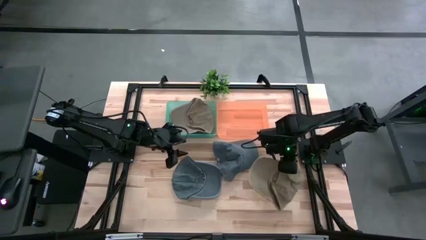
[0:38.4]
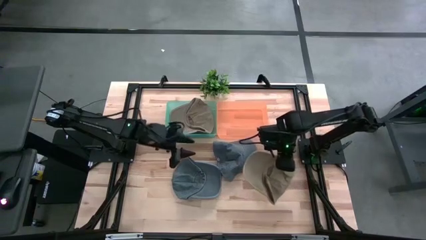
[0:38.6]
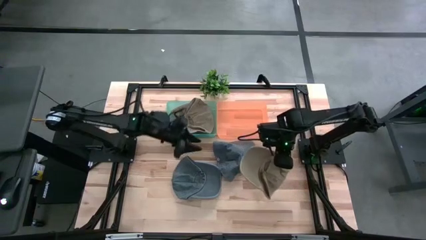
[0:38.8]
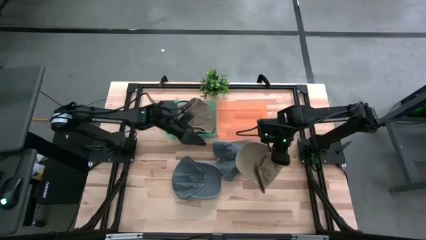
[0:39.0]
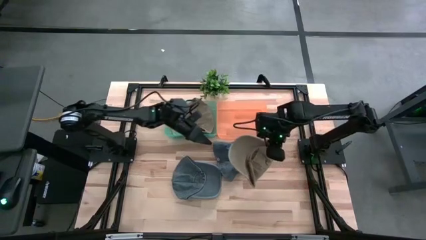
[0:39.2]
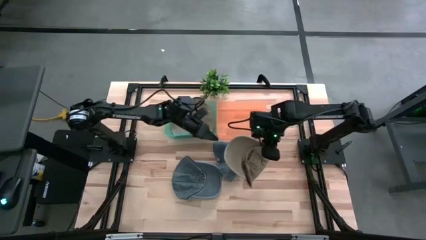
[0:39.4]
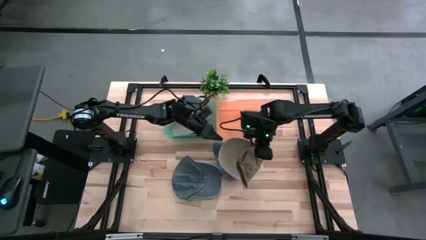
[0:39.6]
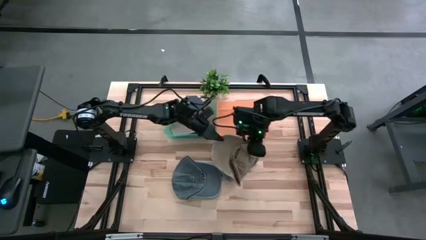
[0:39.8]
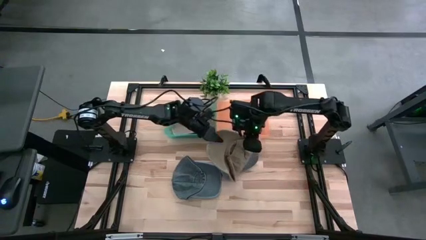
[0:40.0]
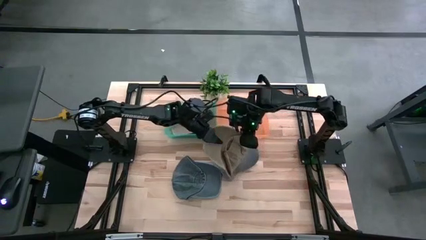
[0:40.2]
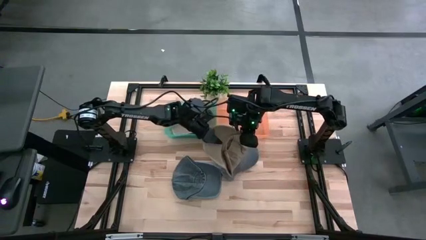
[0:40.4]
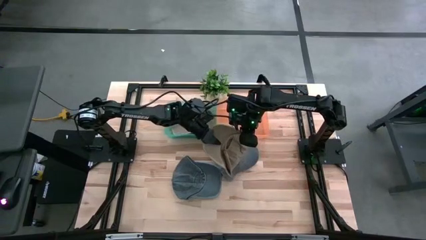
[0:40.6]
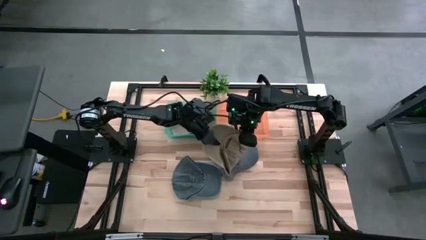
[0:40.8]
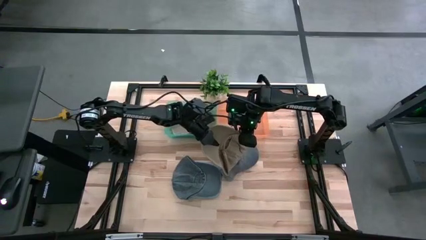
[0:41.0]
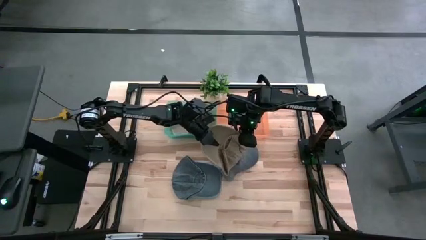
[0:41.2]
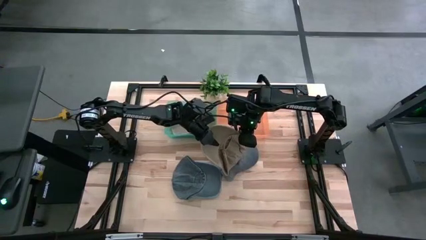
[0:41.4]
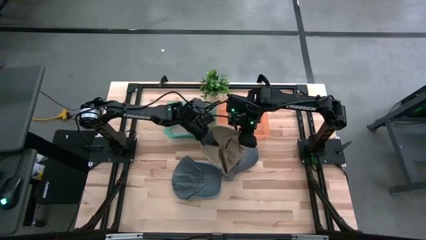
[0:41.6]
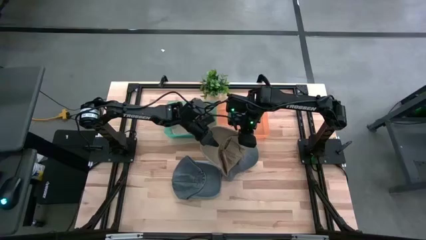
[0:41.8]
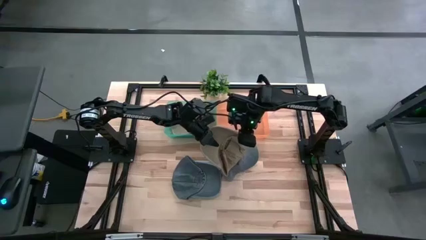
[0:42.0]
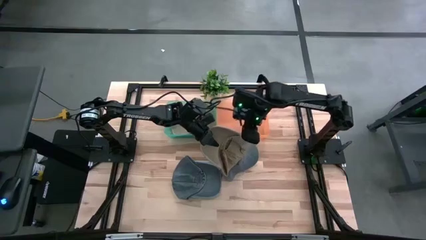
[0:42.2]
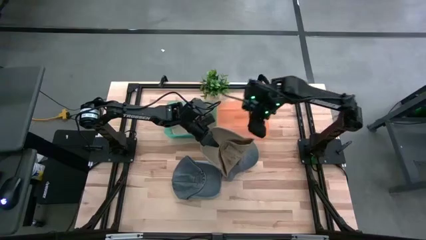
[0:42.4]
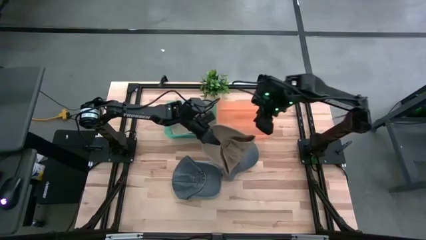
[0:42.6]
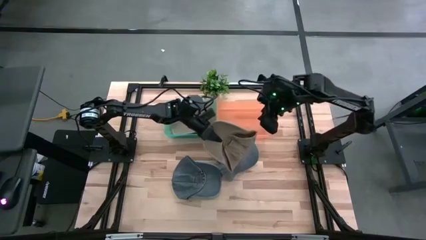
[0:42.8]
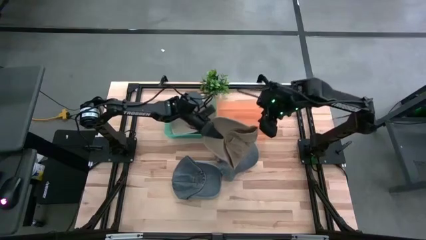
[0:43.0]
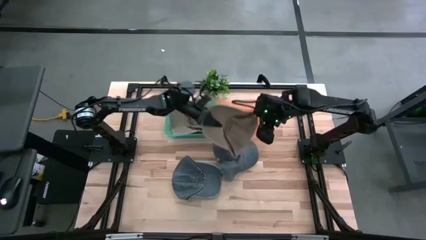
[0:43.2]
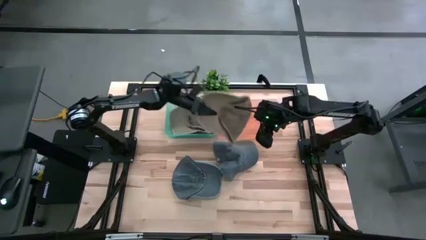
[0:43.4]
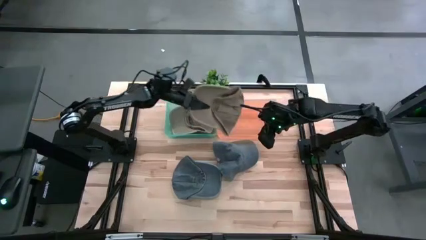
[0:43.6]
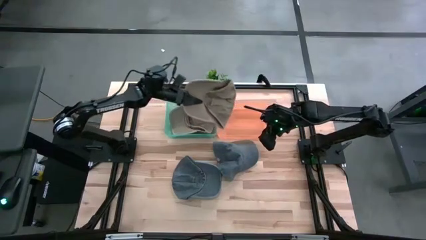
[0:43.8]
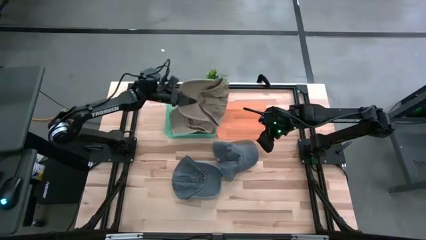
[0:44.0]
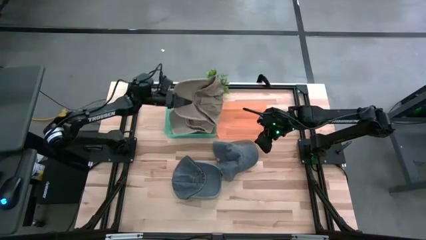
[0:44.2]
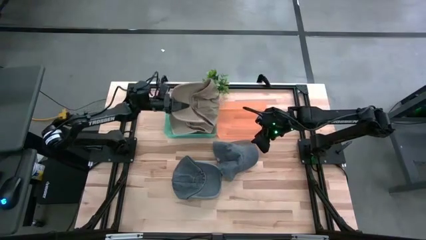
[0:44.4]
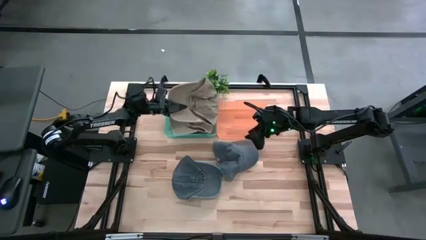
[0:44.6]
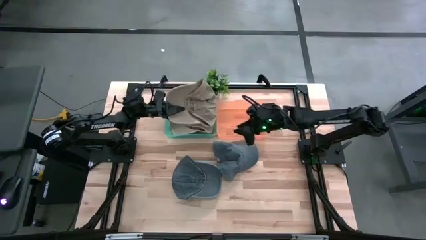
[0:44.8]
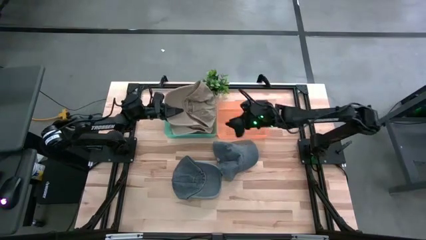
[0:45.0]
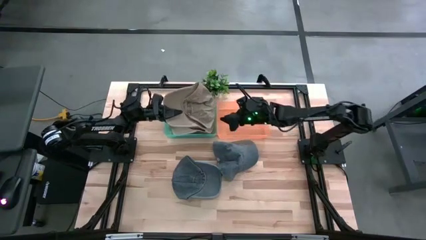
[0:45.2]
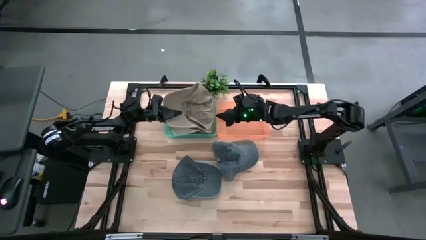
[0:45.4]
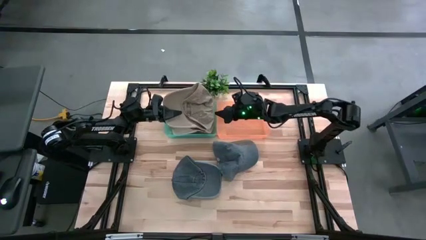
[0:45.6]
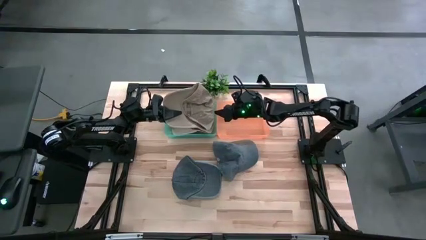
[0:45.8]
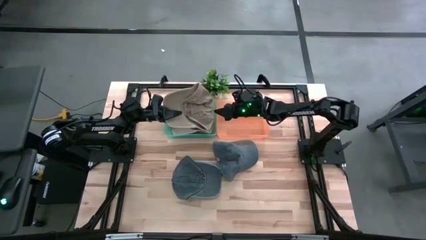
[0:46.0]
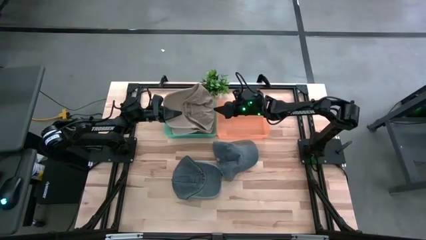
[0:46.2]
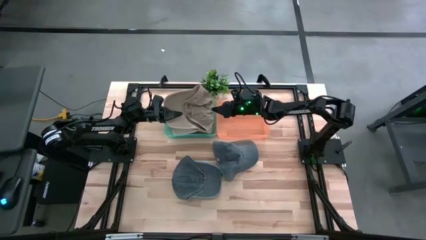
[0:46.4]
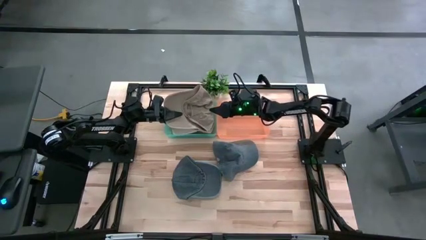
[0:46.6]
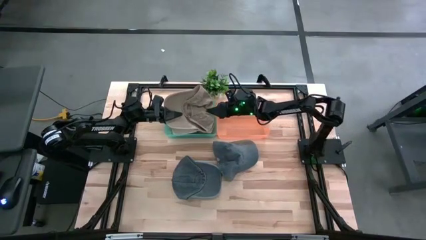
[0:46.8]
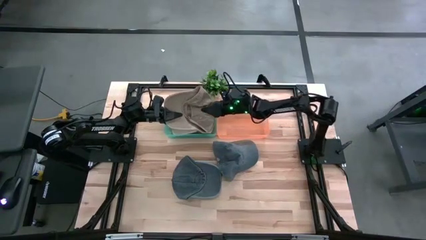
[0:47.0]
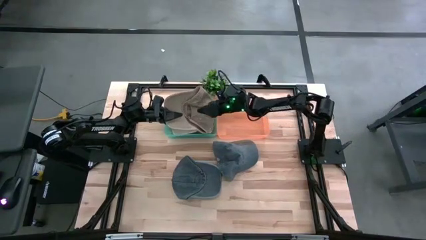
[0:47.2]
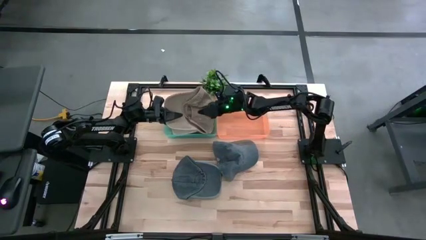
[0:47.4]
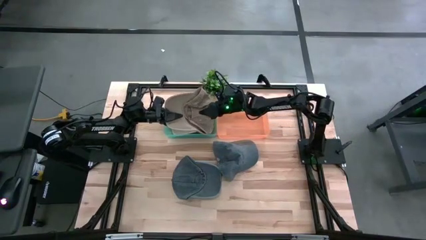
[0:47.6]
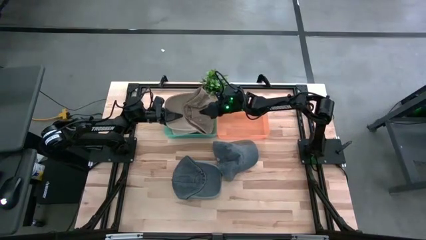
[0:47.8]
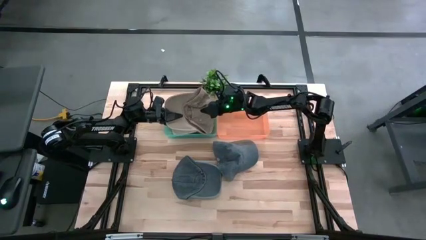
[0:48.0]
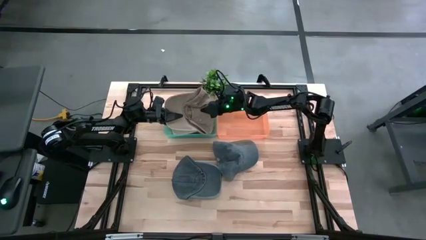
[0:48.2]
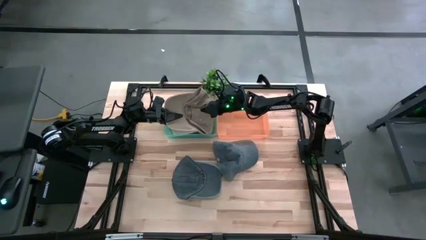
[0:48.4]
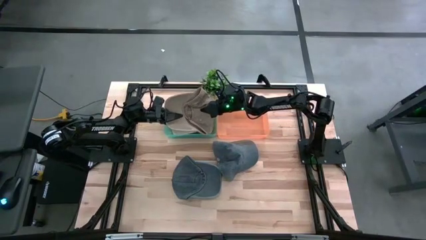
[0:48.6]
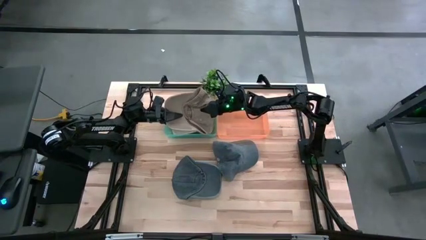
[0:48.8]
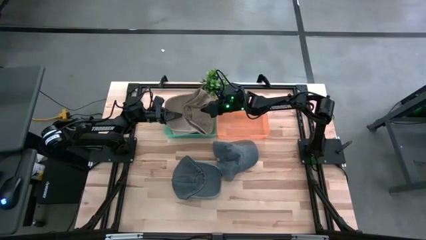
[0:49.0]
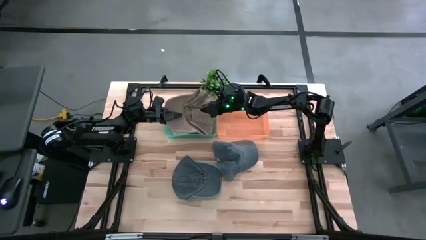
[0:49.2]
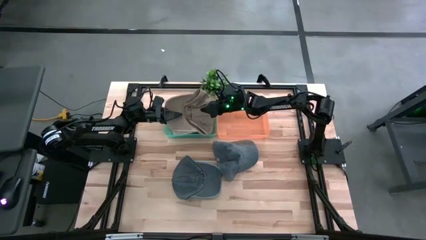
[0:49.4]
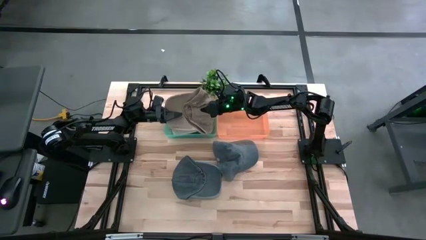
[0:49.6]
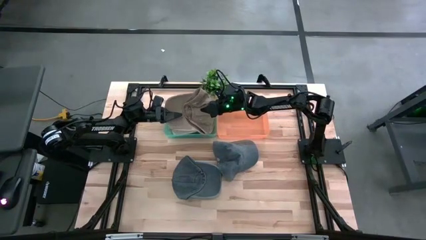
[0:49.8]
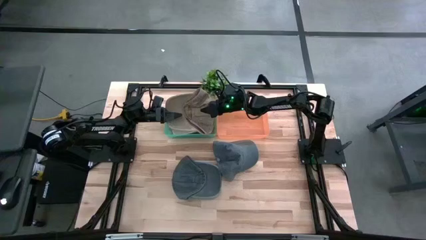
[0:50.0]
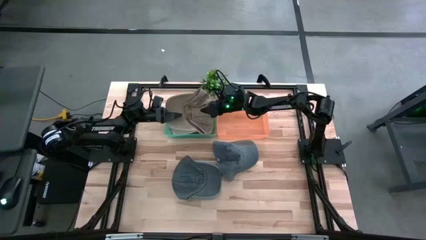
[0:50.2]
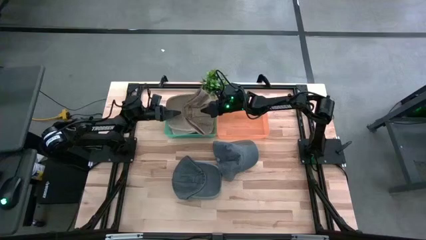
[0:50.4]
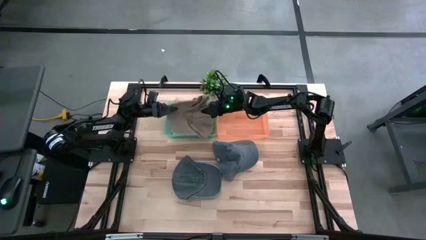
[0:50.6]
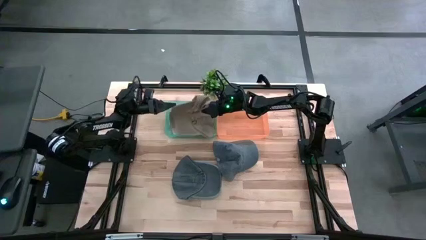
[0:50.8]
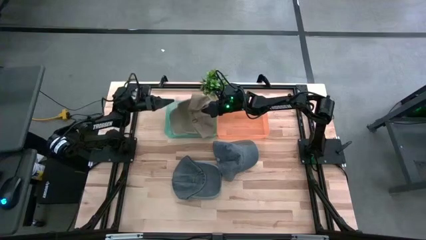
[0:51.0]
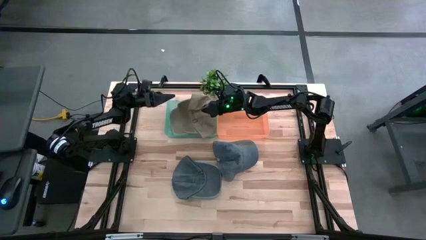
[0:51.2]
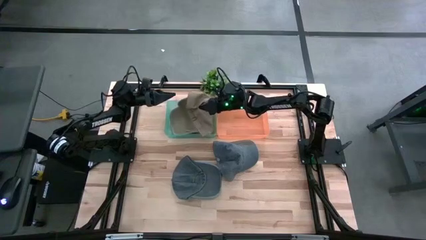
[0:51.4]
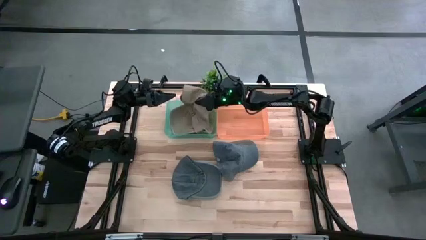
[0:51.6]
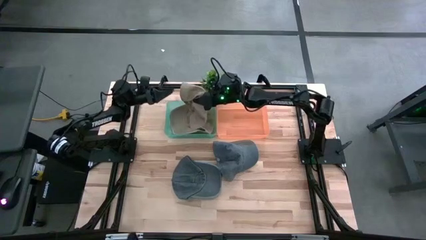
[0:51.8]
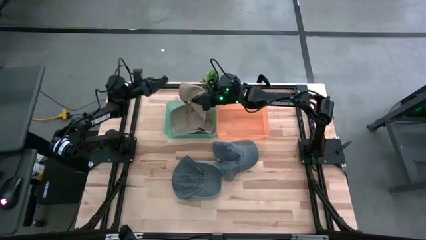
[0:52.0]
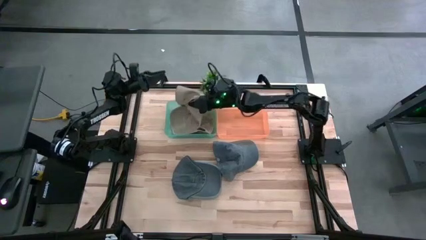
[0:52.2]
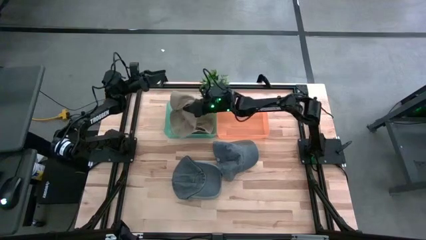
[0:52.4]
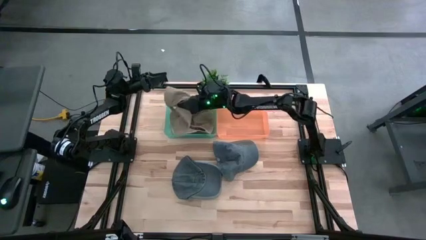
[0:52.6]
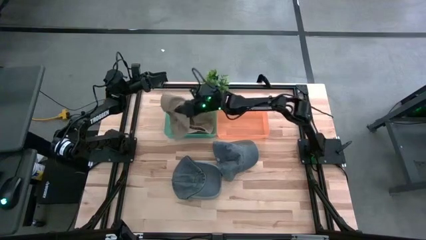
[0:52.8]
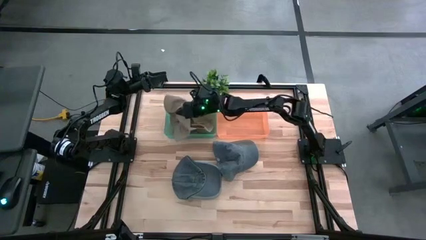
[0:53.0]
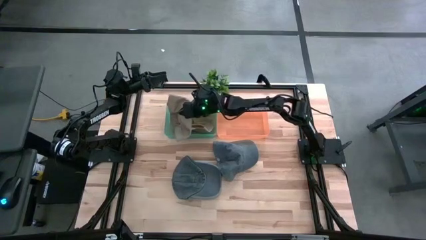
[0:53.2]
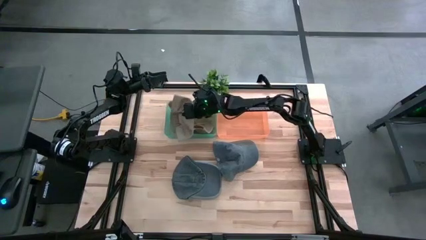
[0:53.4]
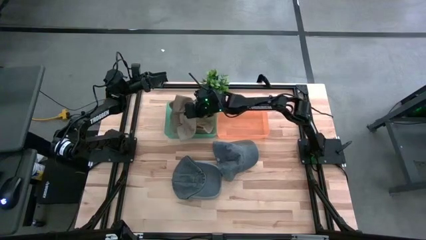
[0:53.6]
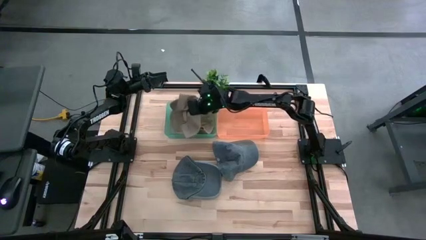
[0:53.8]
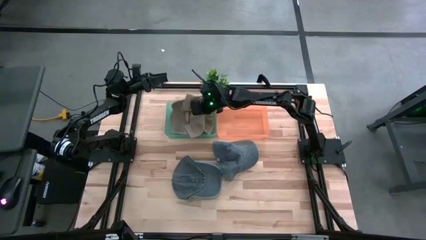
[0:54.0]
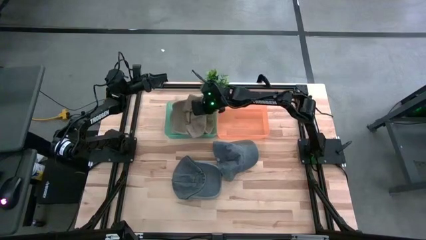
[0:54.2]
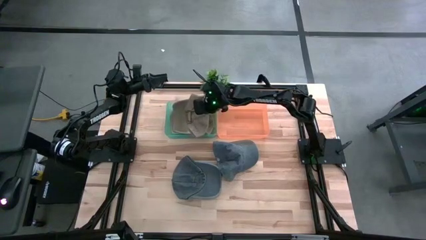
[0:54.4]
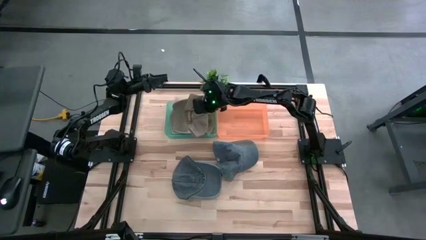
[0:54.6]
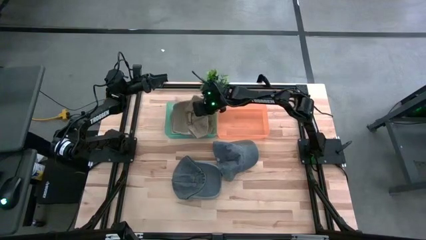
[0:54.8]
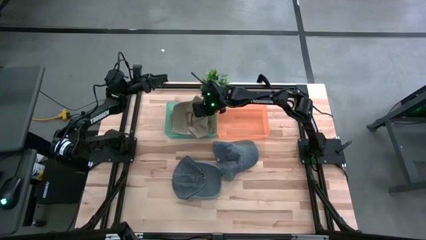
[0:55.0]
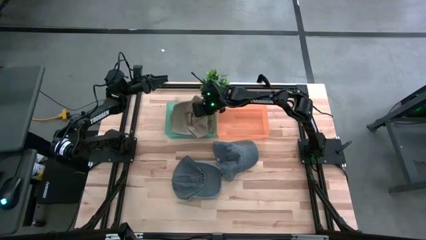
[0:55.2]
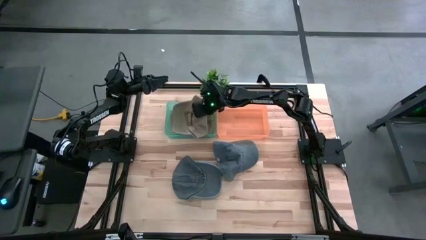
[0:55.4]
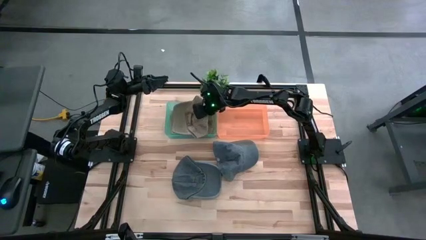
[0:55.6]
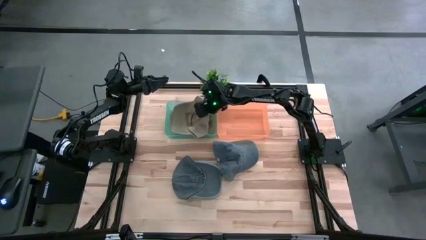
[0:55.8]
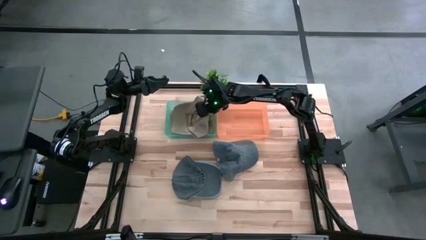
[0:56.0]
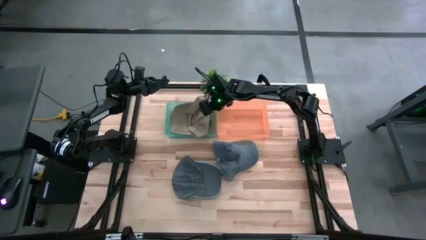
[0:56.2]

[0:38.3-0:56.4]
Task: Pick & Place hat
Put the brown cap into the light green bin
